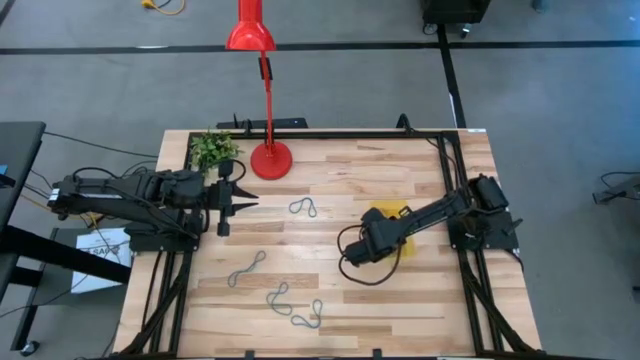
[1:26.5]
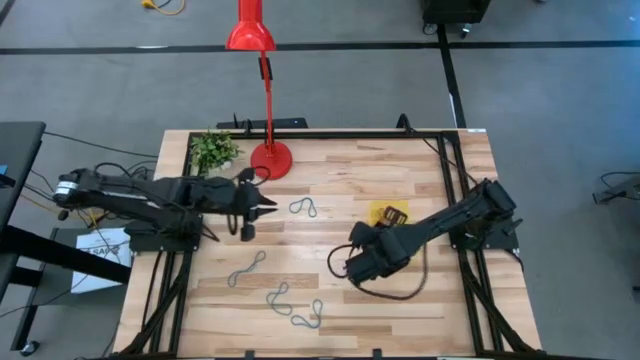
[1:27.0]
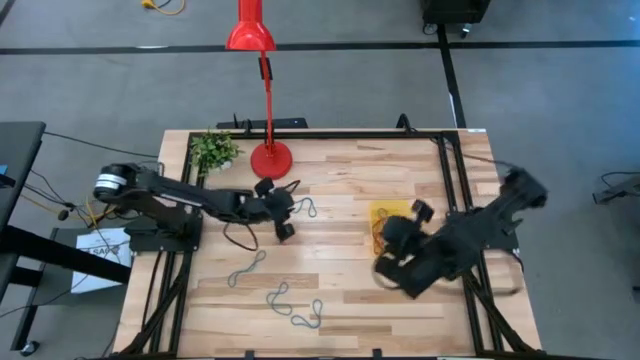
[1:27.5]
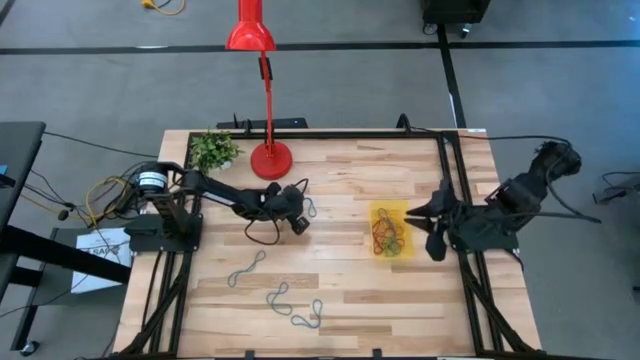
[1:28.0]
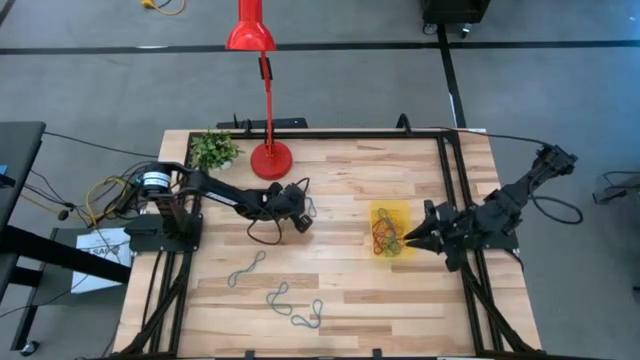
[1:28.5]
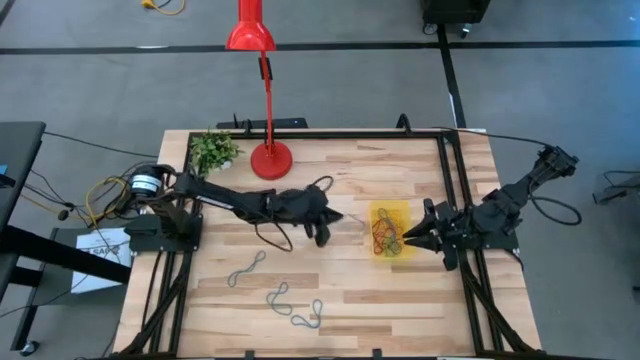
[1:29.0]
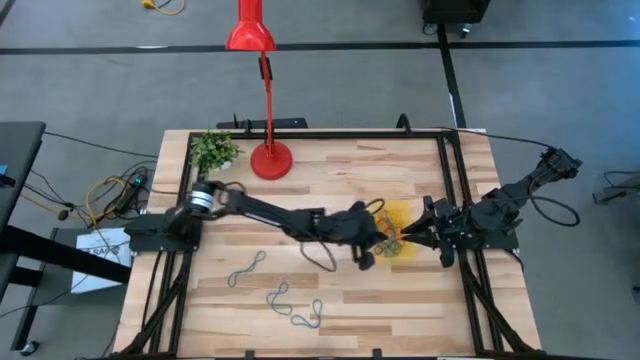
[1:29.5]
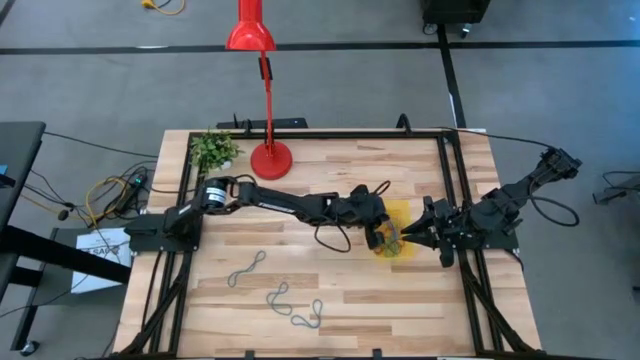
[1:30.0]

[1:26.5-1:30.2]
Task: Pick and place items into bin
Put the blue rubber band into the yellow bin

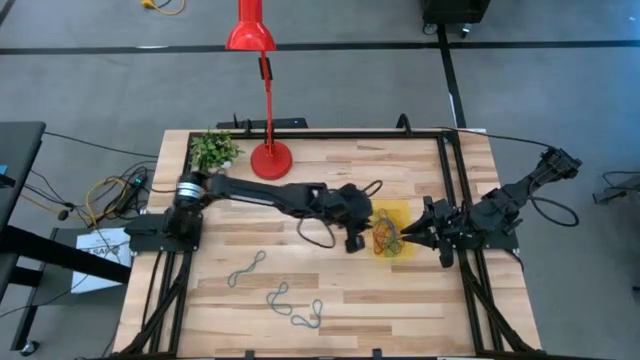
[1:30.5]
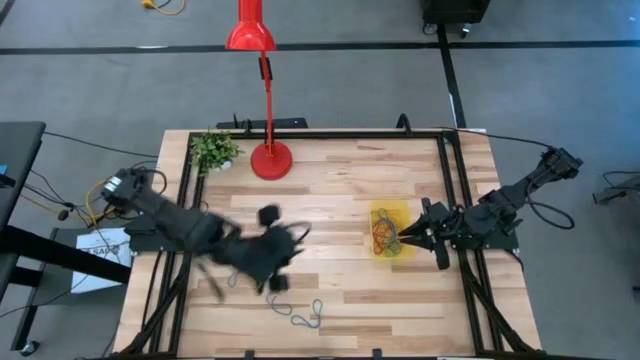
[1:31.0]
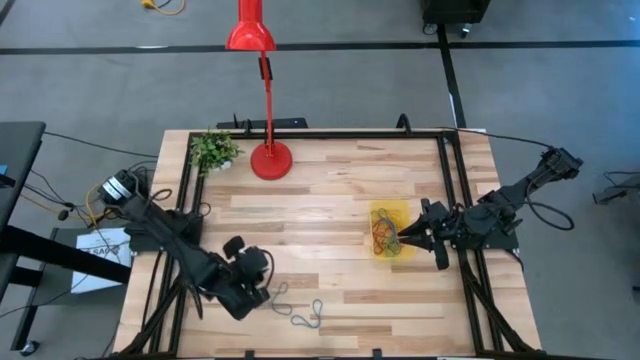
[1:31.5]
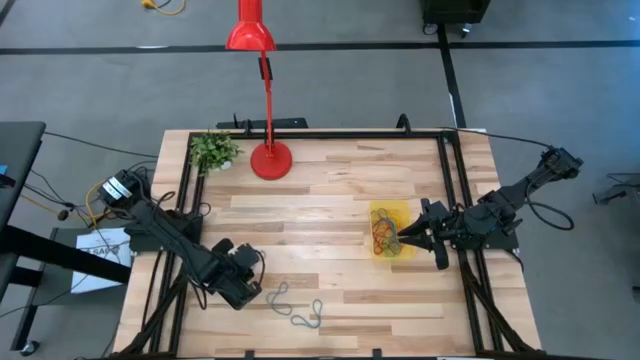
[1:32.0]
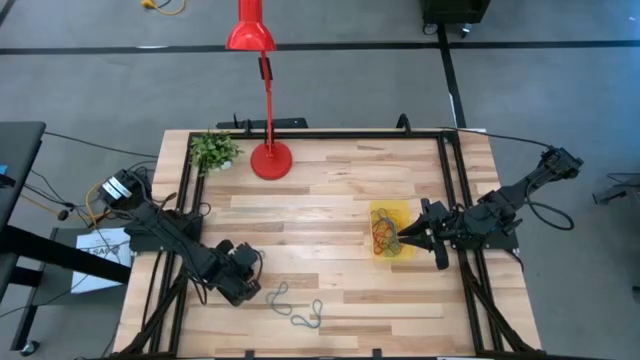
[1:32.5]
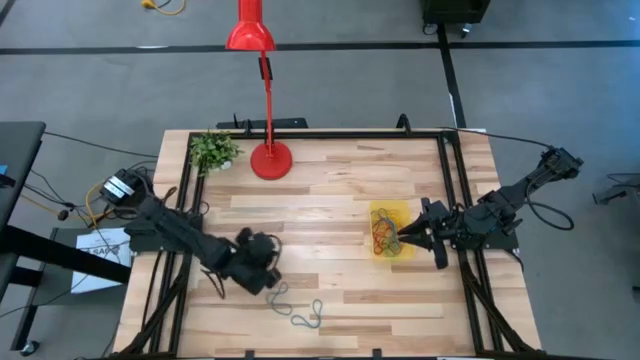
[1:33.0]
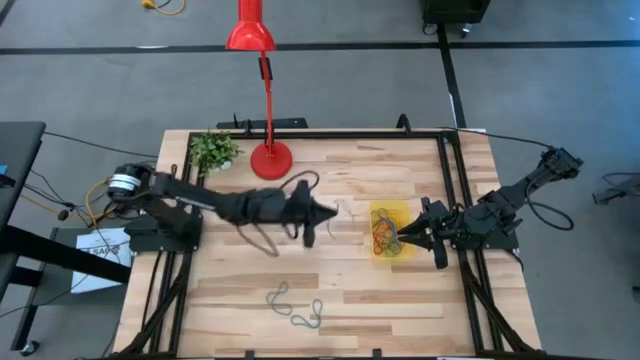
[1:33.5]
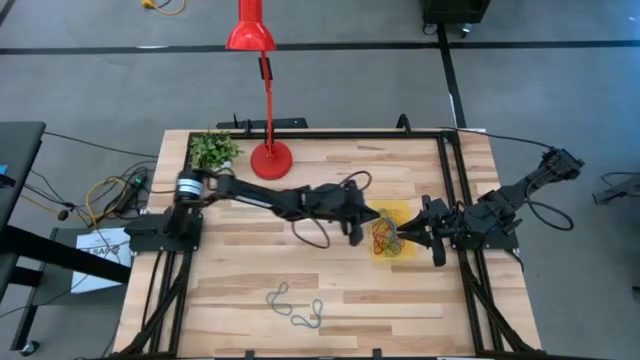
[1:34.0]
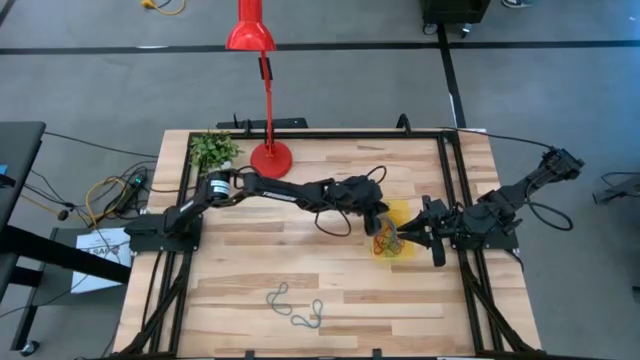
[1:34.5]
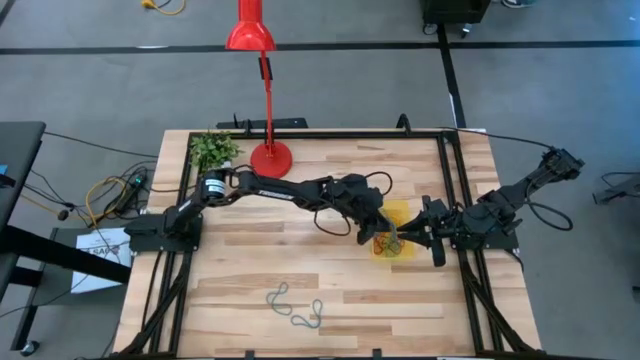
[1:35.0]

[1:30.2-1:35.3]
Put the blue rubber band into the yellow bin

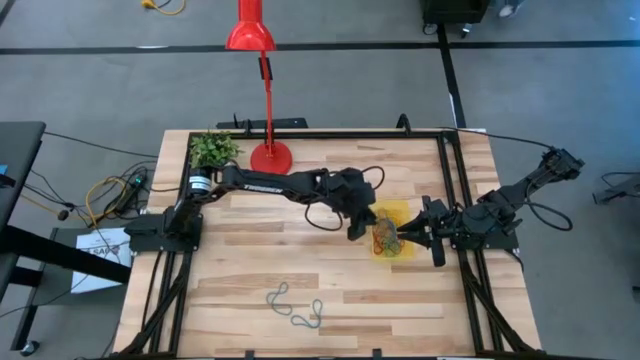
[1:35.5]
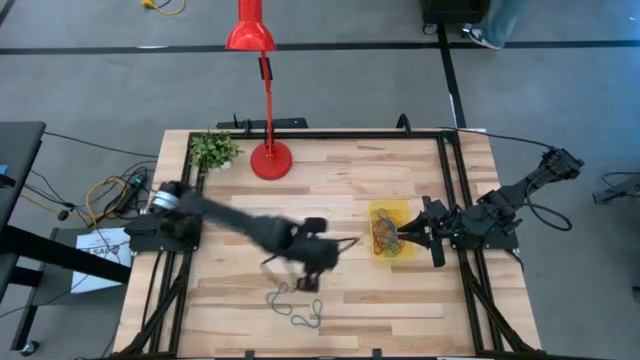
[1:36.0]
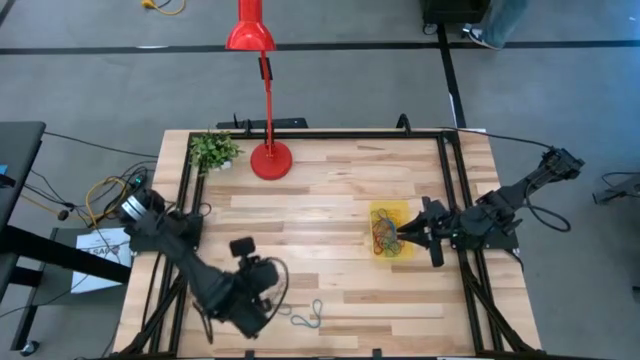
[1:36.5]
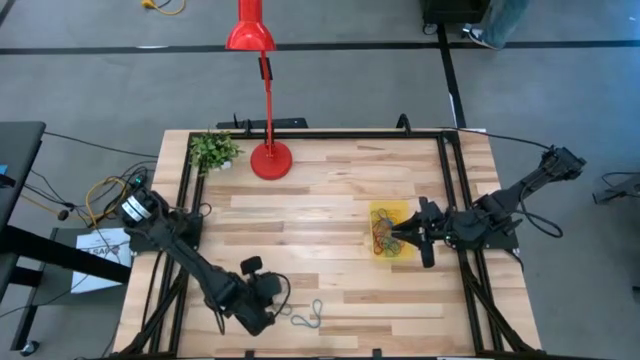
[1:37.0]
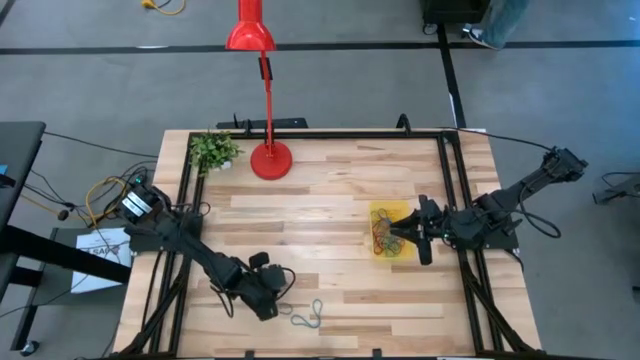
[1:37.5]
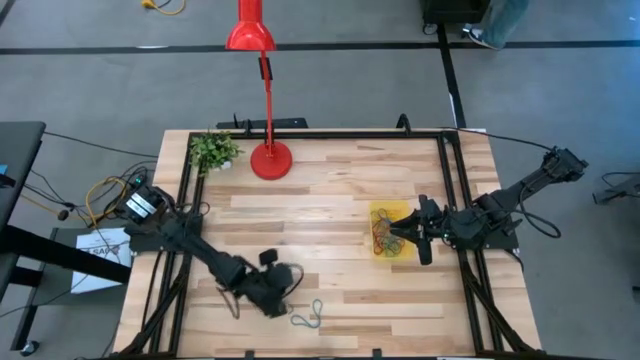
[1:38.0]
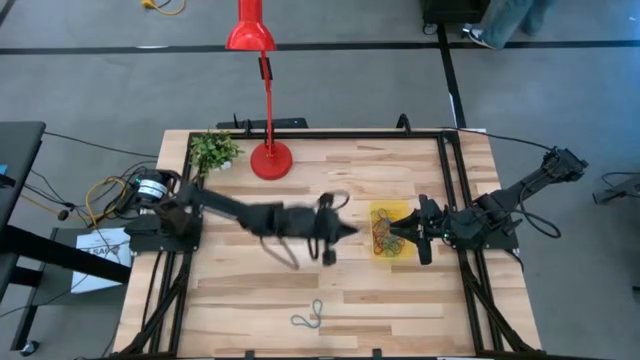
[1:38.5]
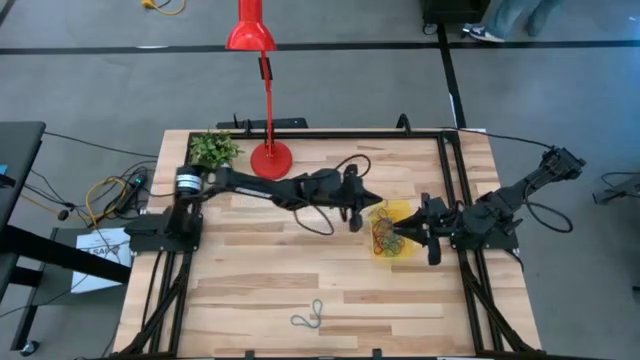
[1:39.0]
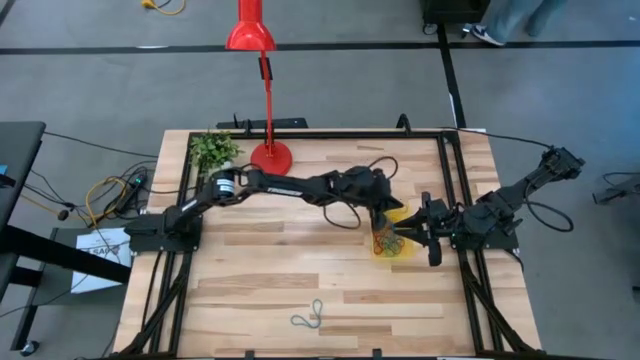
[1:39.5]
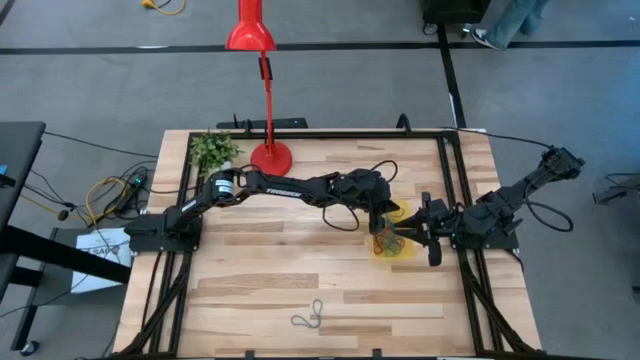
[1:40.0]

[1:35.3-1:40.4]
Put the blue rubber band into the yellow bin

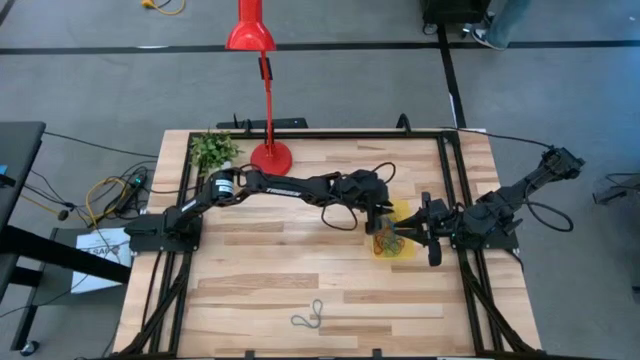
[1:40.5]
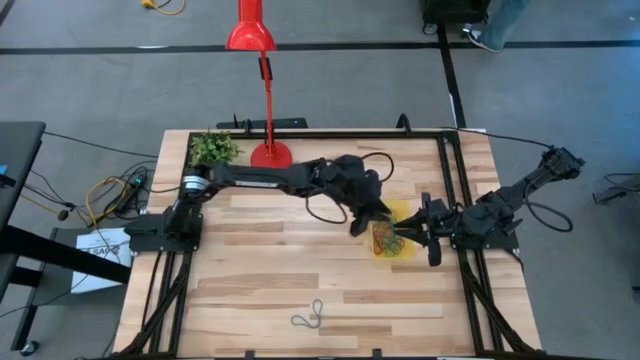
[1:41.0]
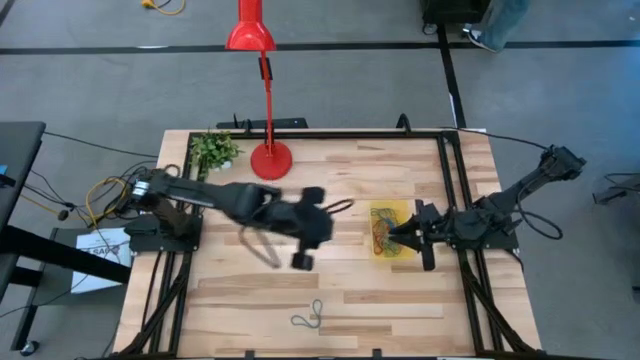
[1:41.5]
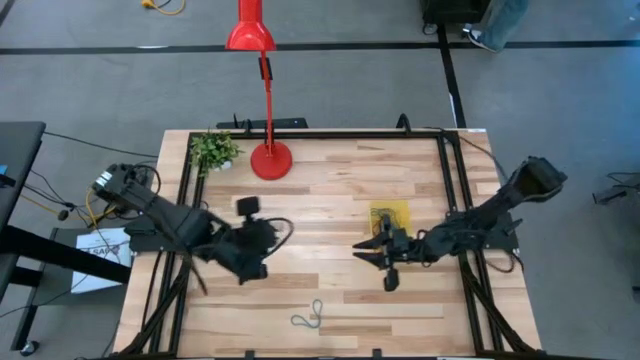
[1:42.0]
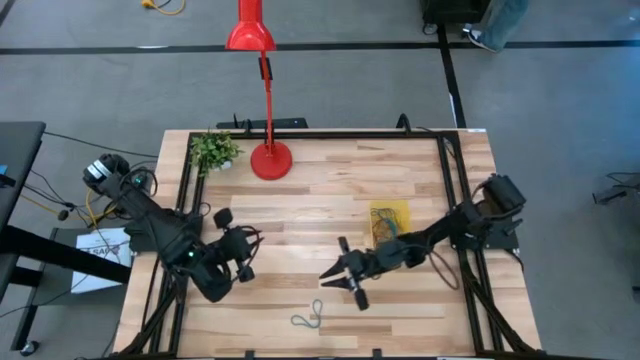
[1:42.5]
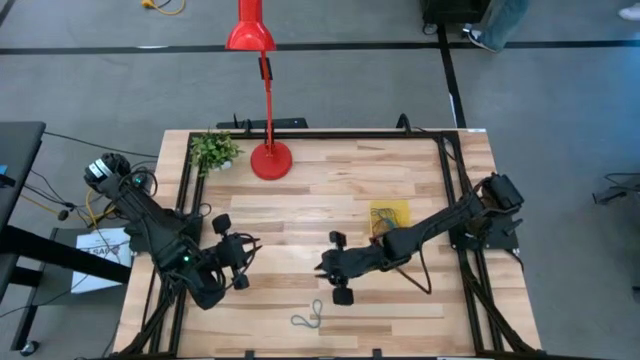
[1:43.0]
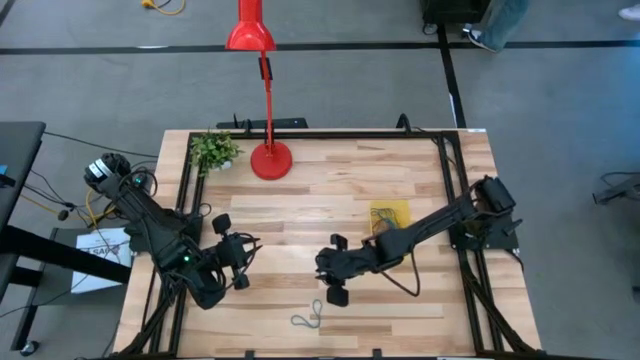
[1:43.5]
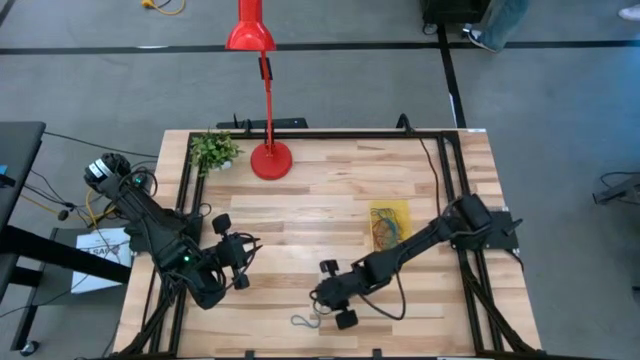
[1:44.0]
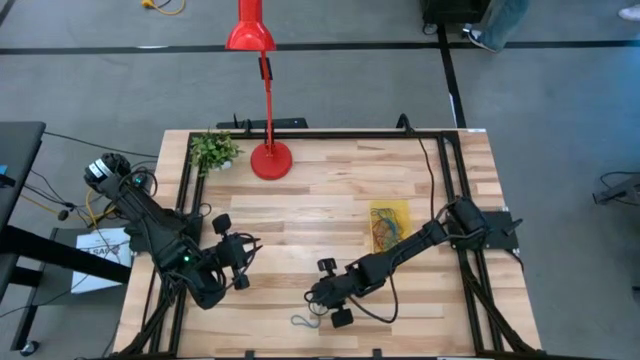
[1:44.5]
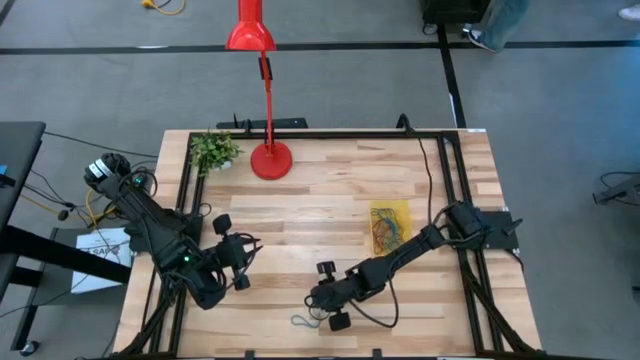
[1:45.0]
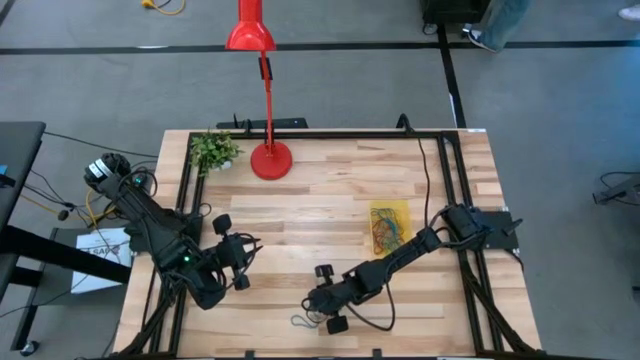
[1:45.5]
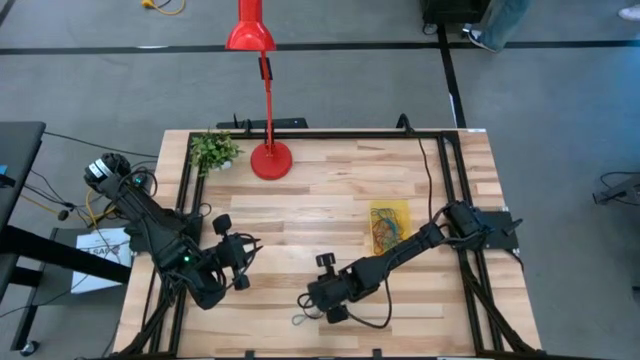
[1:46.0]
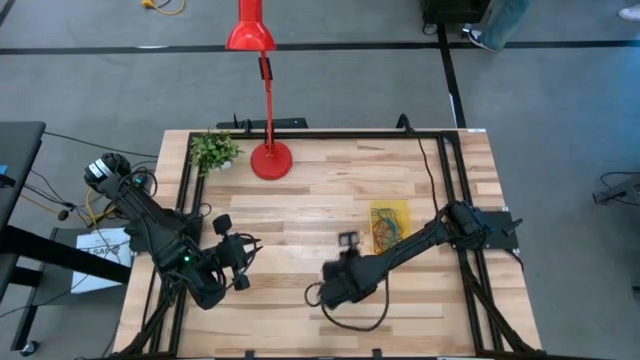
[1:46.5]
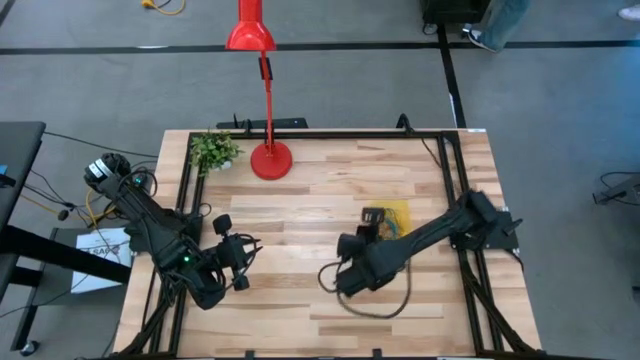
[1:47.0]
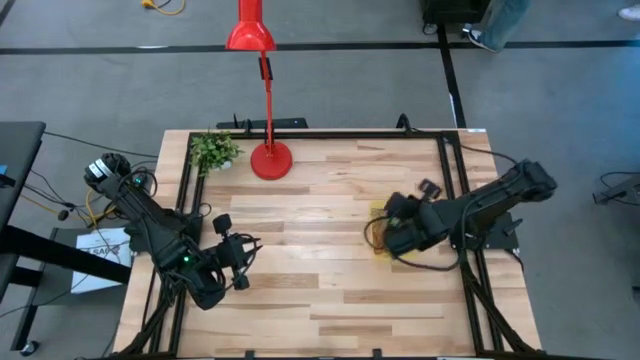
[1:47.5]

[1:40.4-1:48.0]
Put the blue rubber band into the yellow bin
